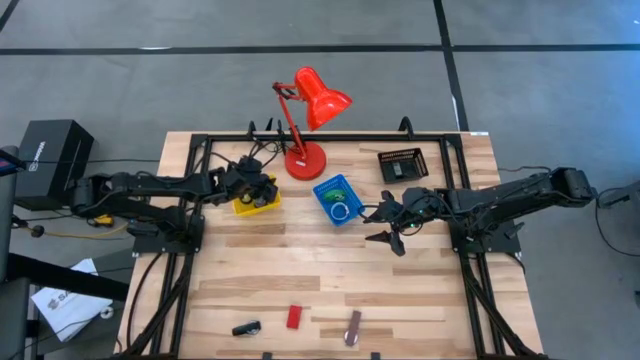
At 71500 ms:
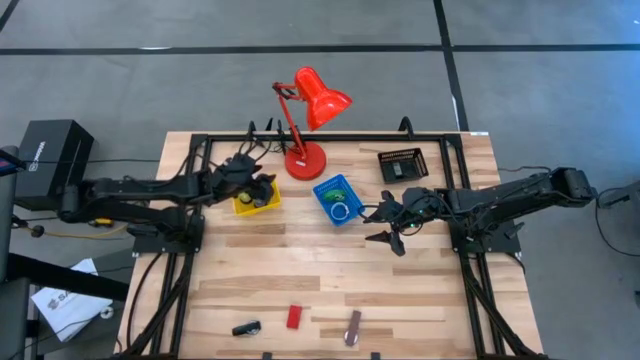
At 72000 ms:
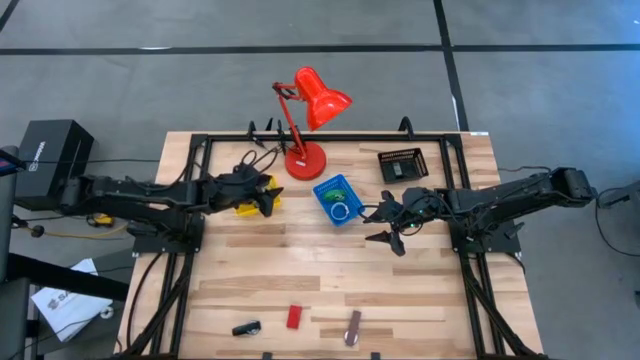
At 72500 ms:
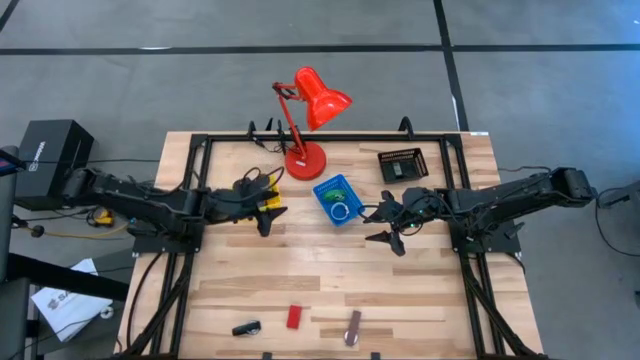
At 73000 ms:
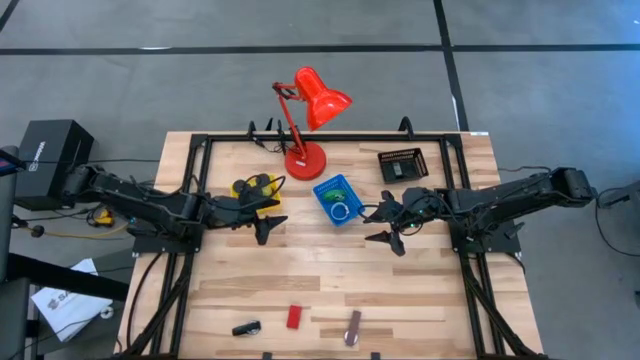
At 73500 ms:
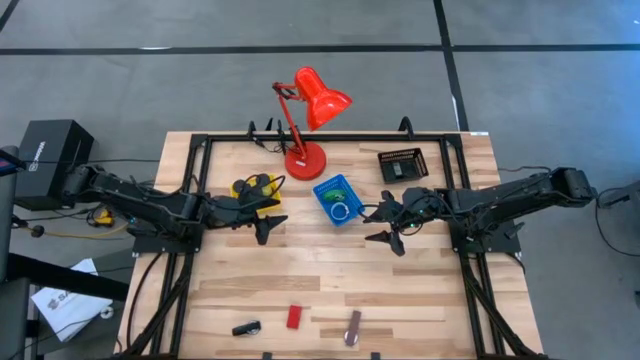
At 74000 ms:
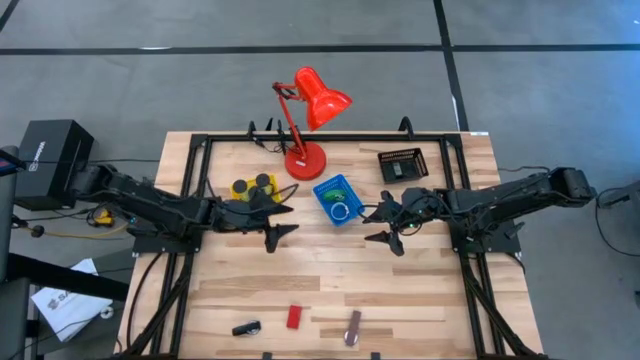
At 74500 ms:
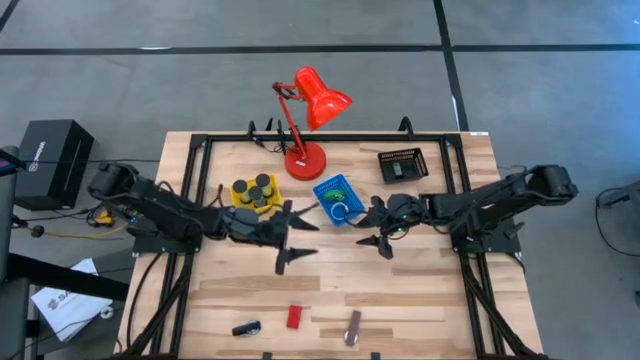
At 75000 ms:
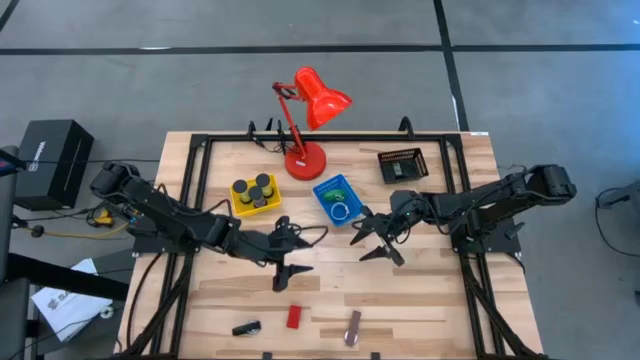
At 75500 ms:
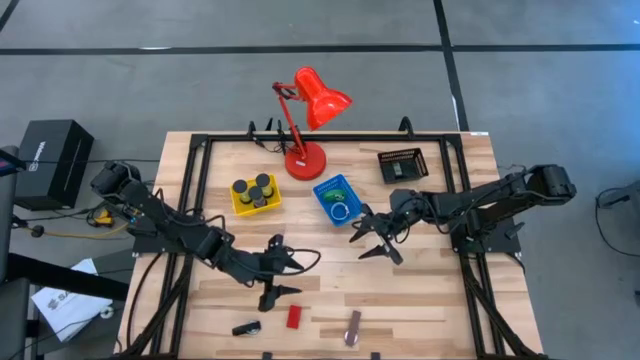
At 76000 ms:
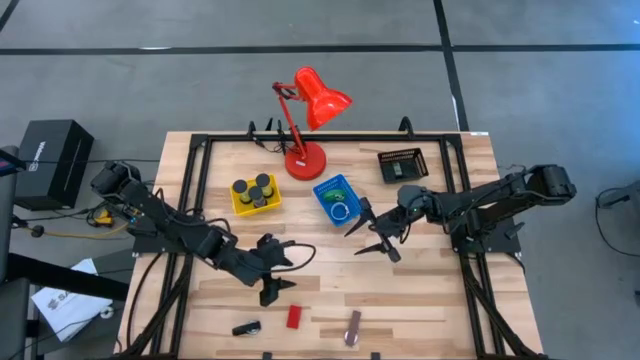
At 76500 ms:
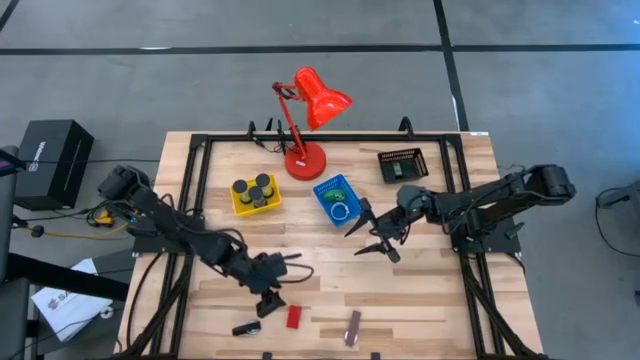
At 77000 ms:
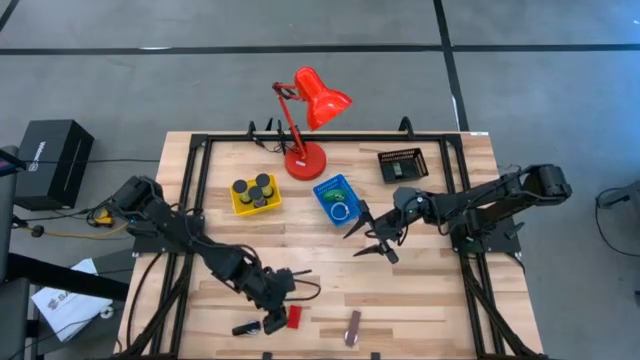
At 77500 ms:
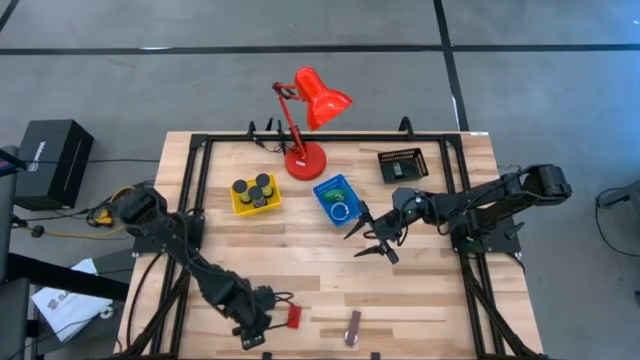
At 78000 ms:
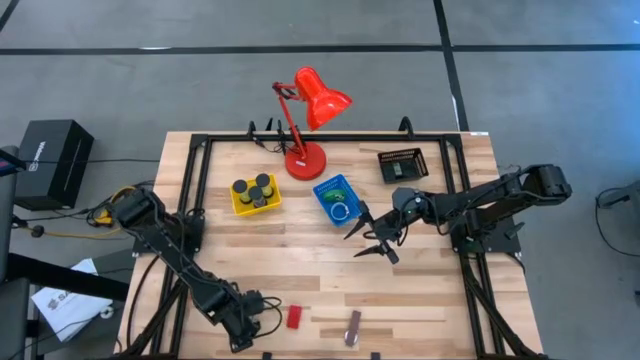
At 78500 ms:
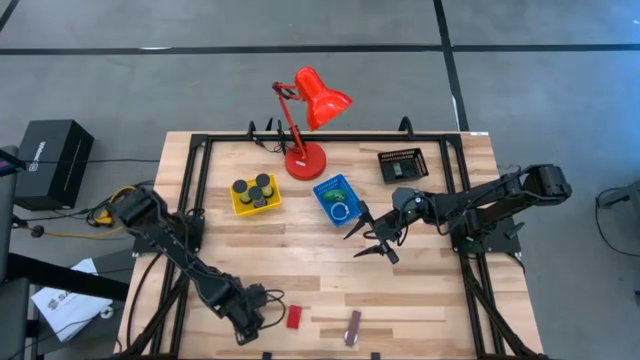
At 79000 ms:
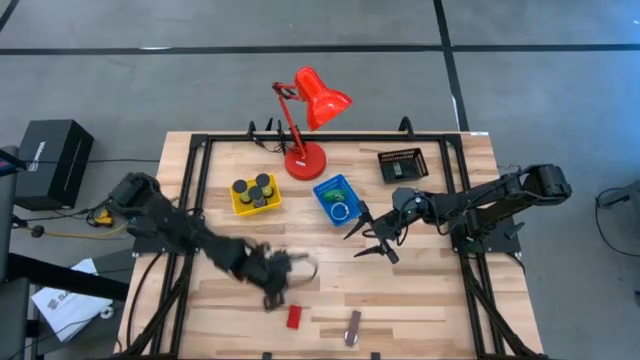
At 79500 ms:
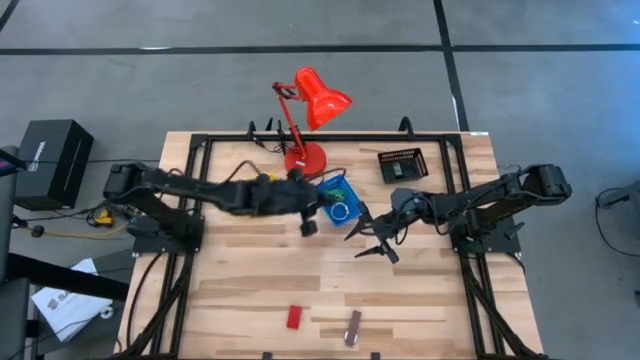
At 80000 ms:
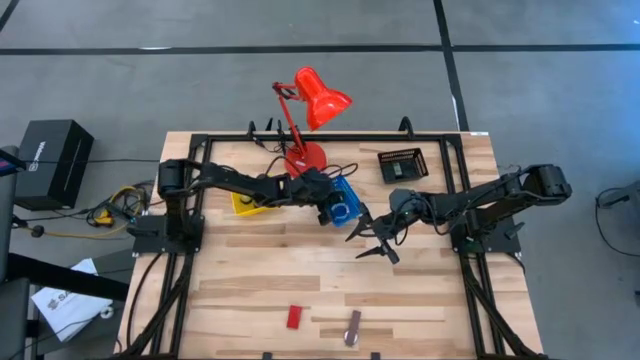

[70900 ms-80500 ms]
Task: Pick & Place Office items
Put the black wristwatch into the blue bin

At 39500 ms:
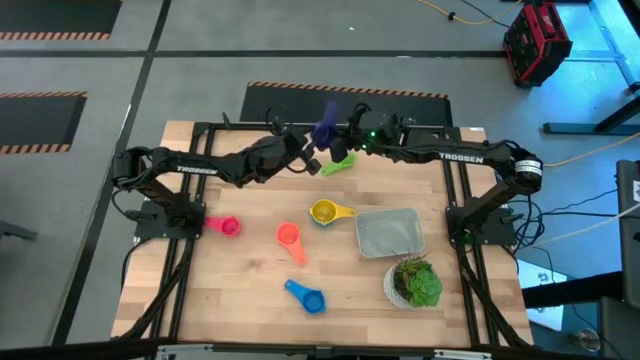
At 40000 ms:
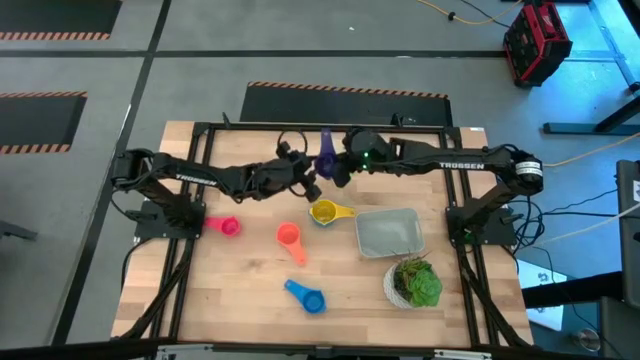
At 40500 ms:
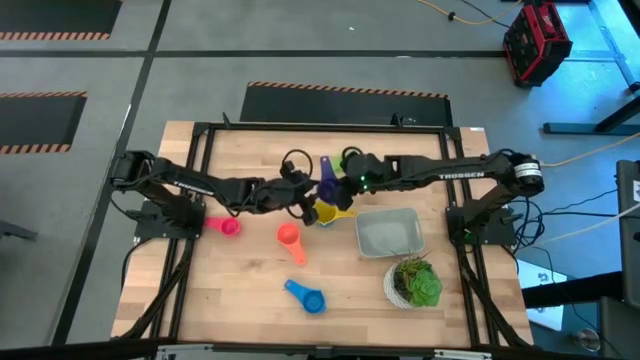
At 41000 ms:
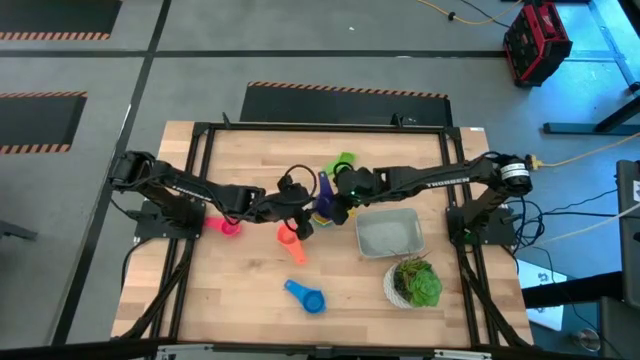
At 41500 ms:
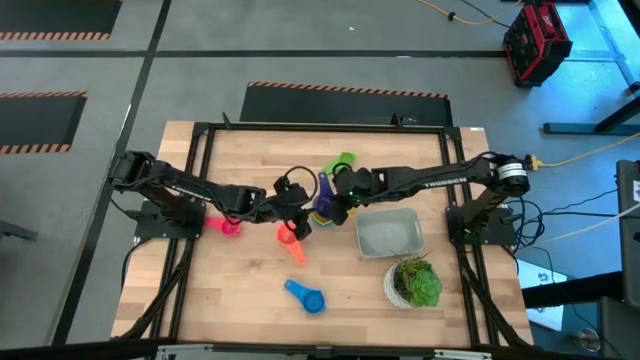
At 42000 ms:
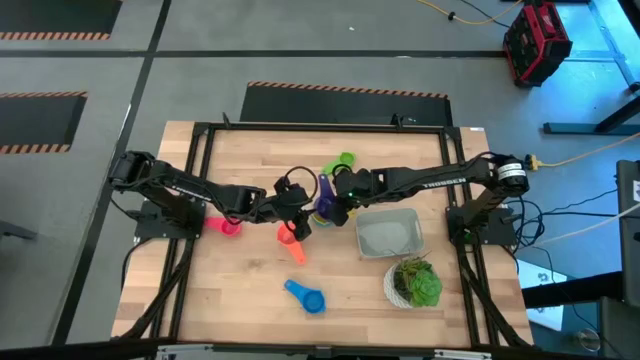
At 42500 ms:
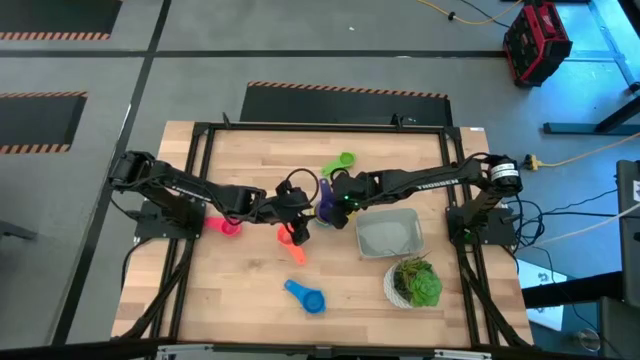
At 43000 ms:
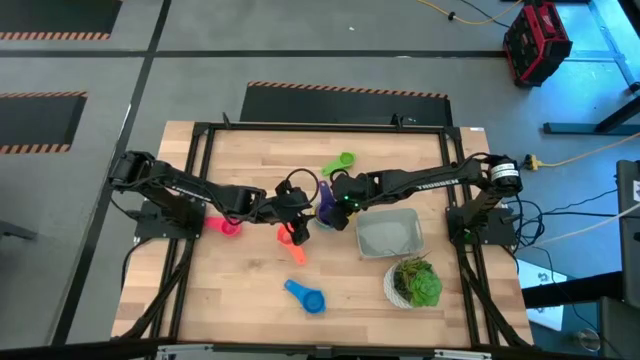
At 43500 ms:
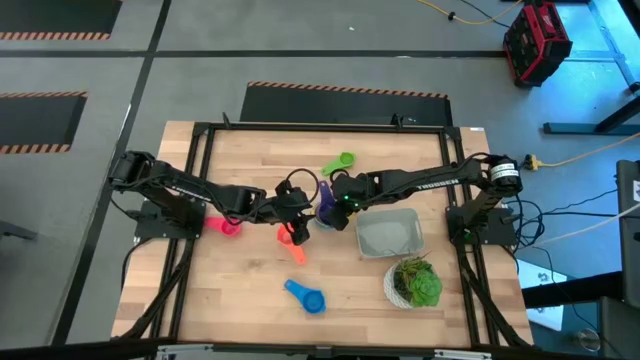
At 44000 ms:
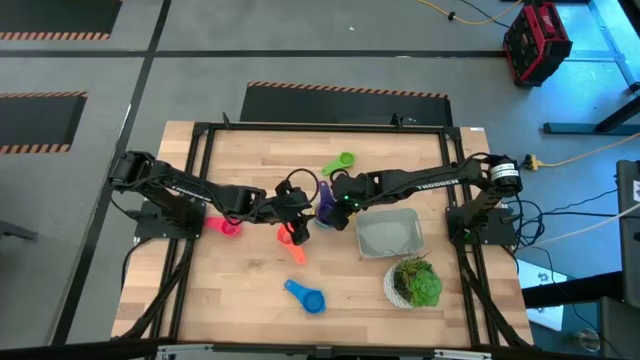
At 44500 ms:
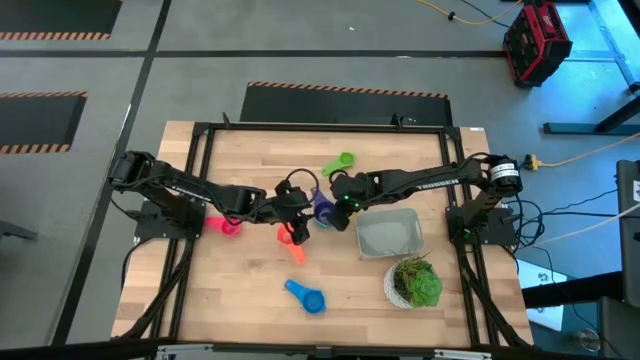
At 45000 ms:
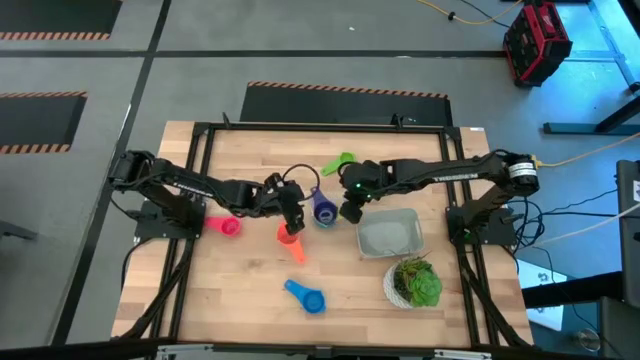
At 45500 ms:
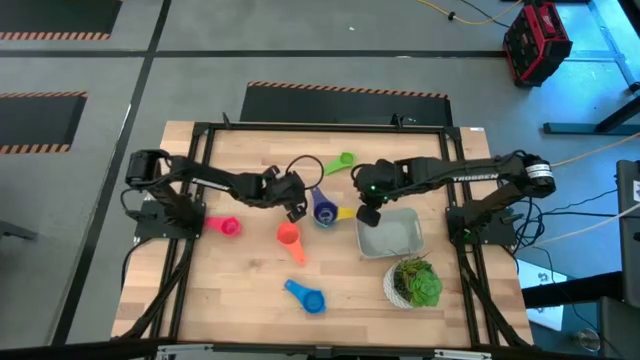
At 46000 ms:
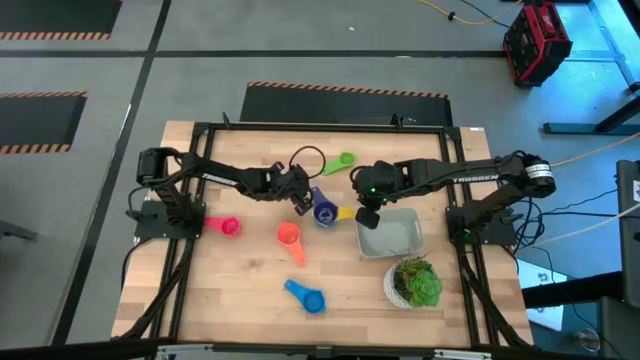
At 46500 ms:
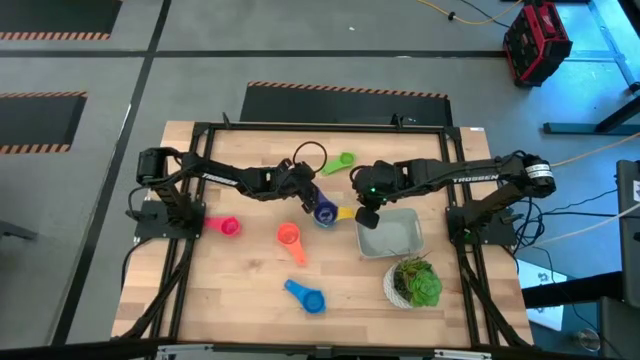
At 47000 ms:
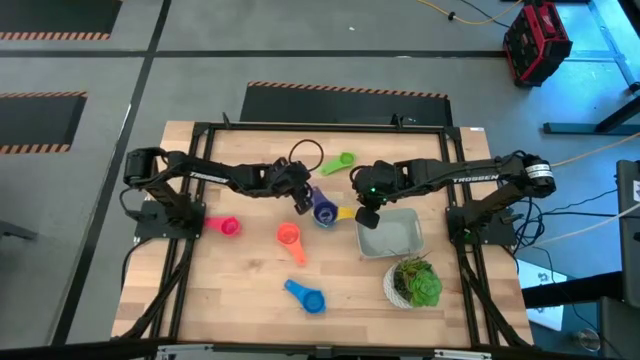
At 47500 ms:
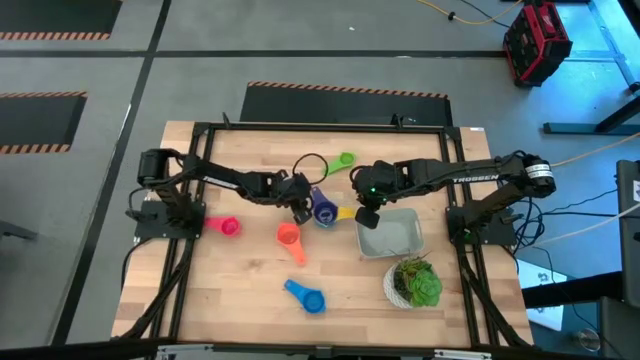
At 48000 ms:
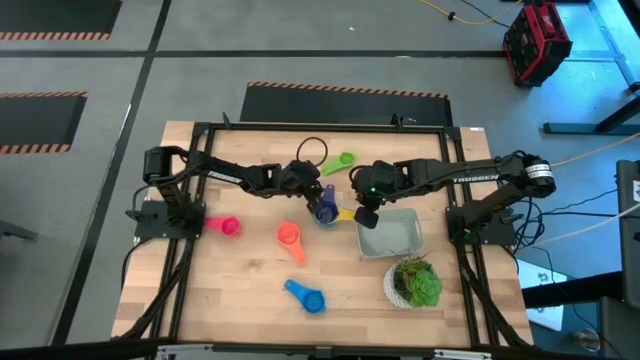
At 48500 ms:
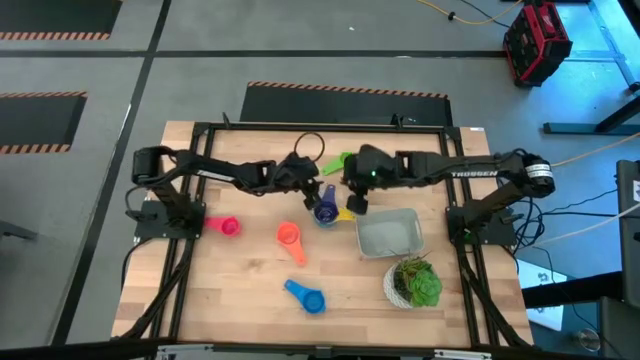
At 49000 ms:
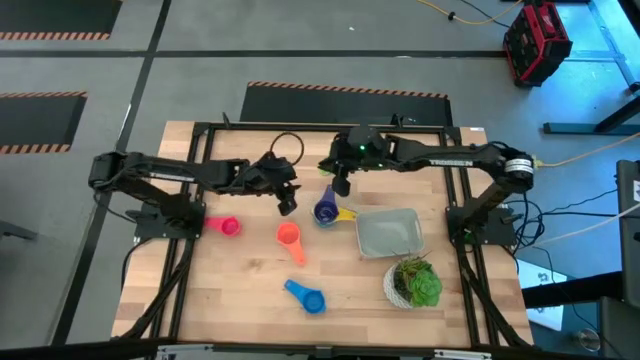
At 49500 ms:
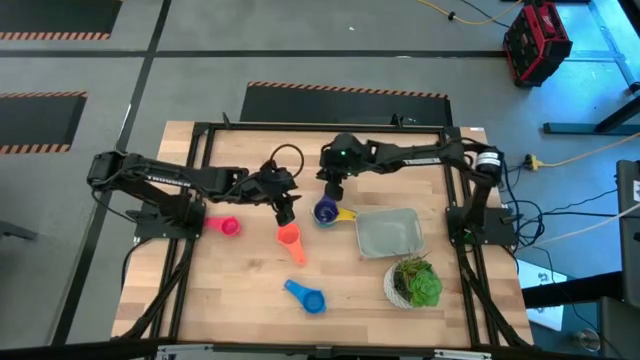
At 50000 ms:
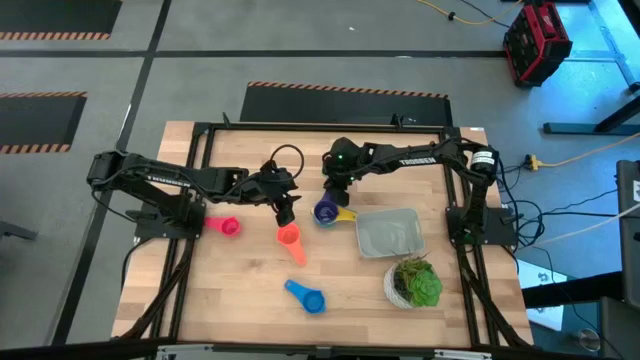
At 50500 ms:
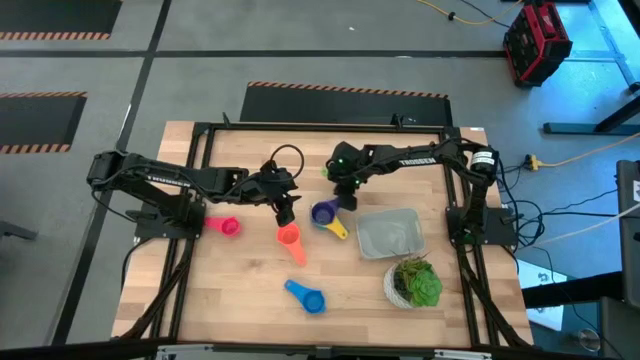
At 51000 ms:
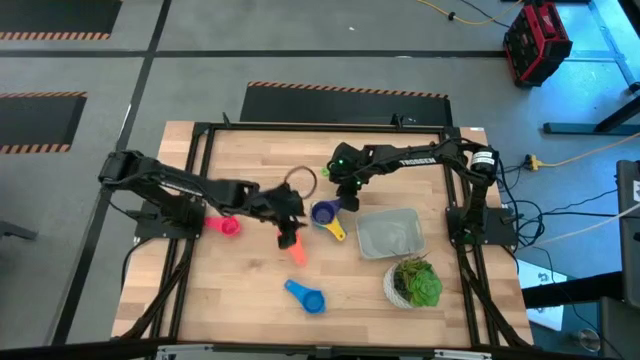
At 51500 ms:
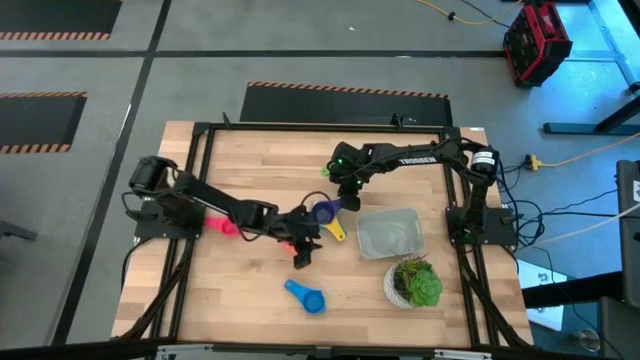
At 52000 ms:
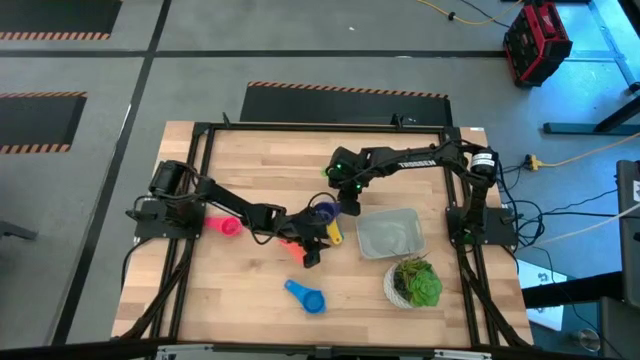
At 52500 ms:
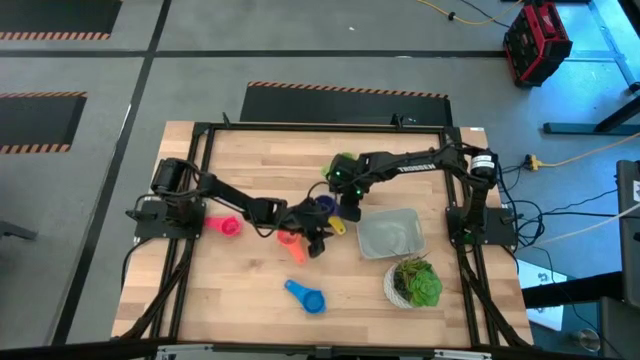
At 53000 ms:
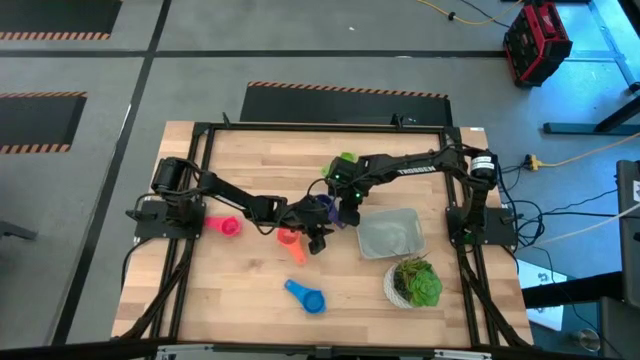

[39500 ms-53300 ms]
Task: Nest measuring cups in basket
Stack the violet measuring cup on top of the yellow measuring cup
